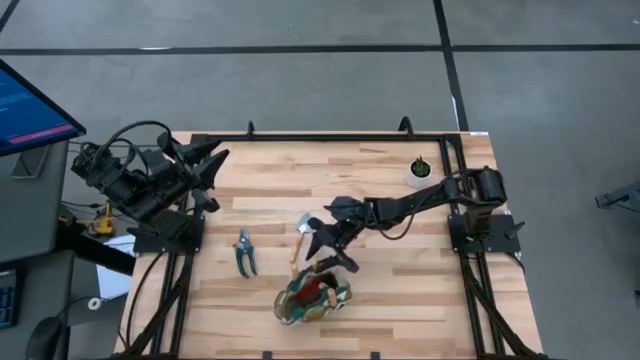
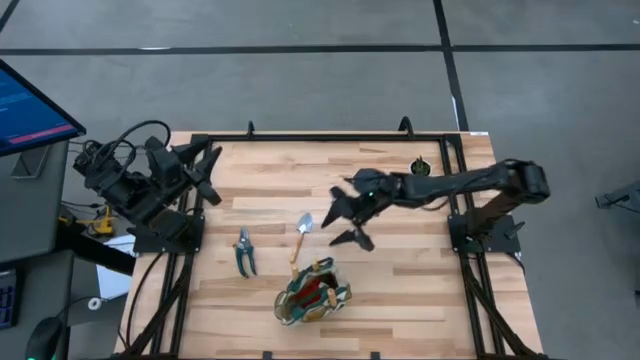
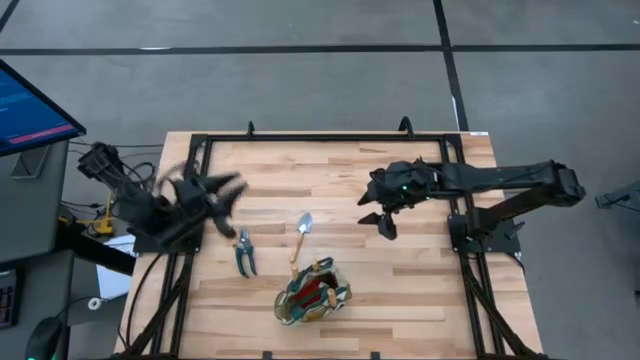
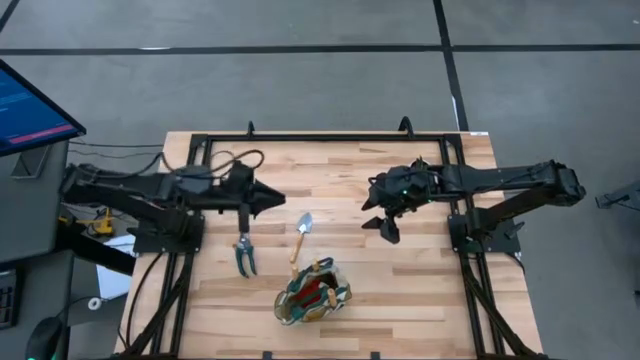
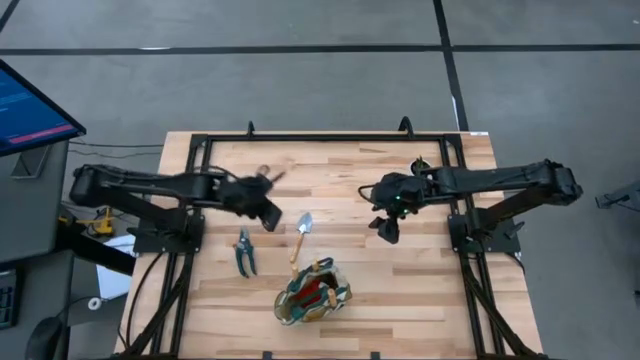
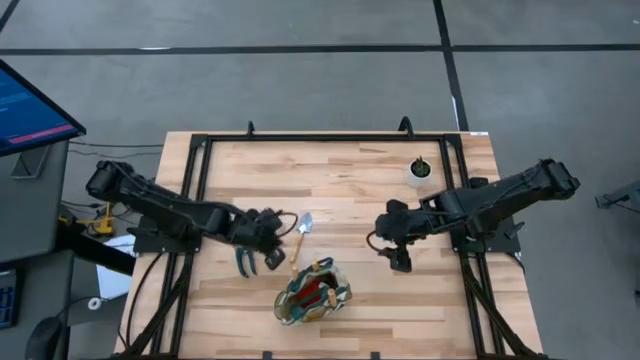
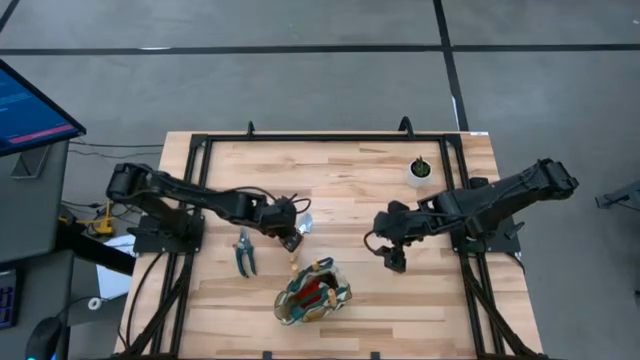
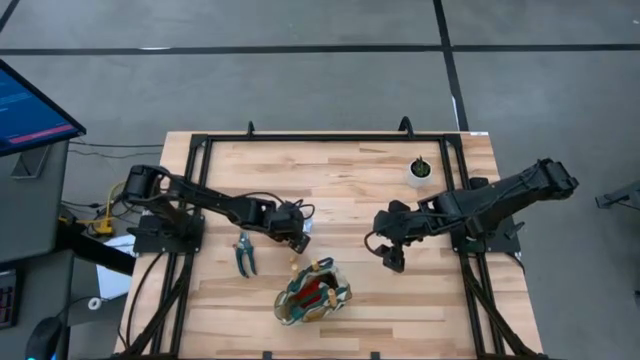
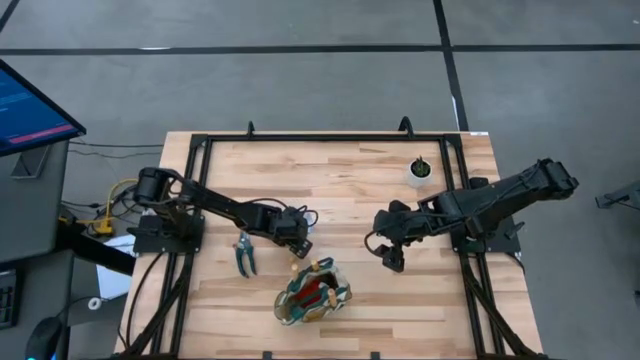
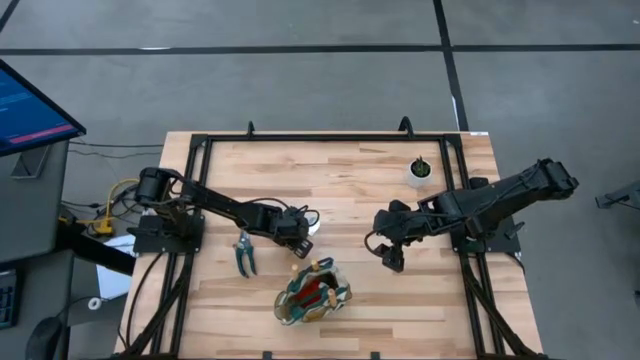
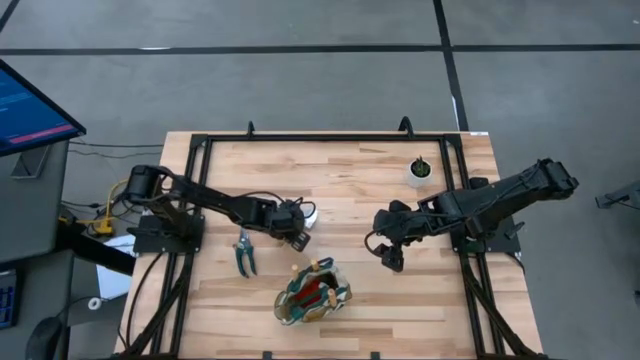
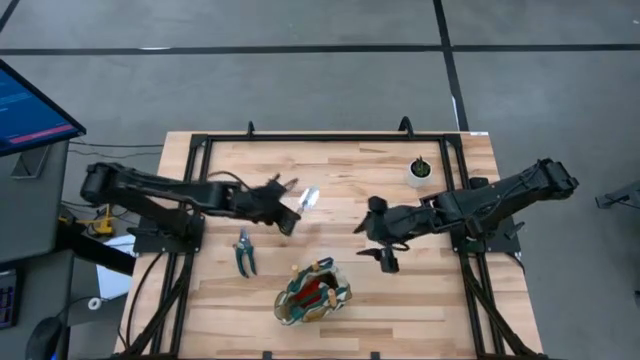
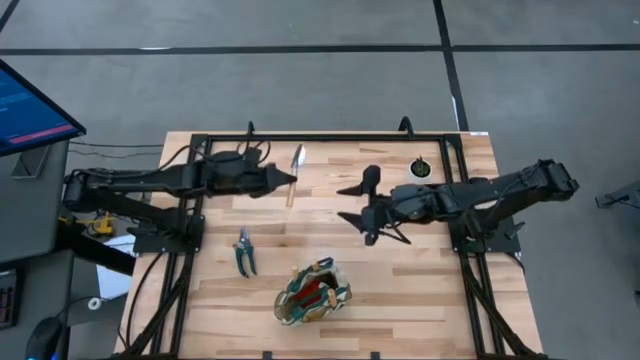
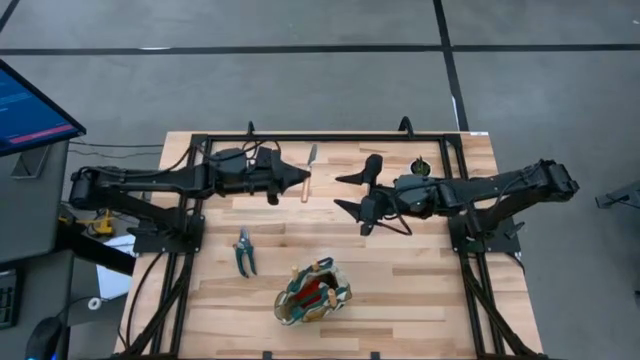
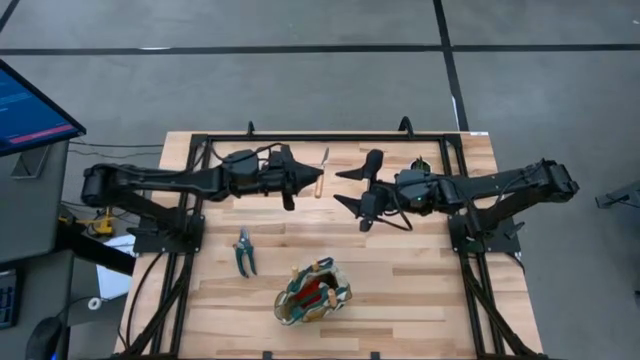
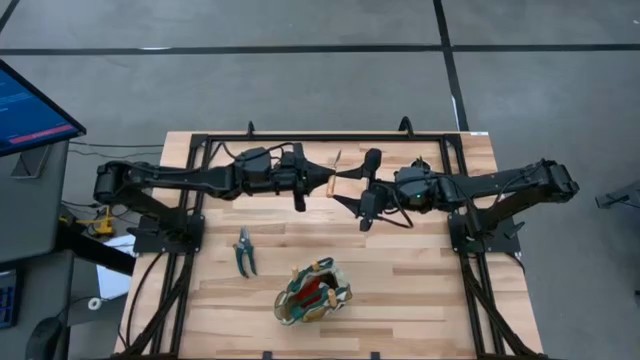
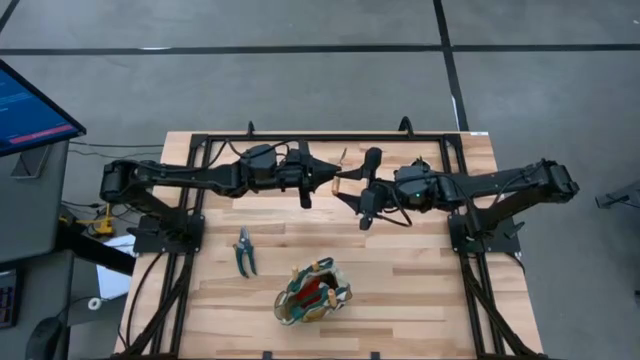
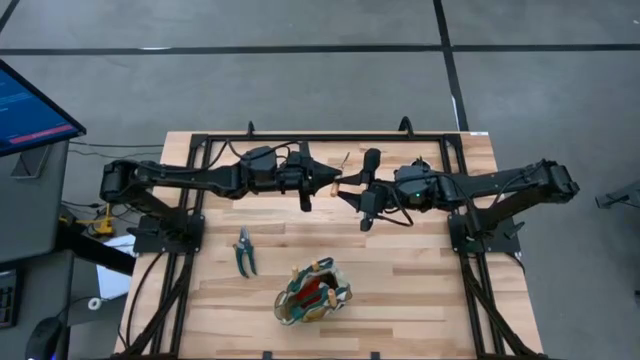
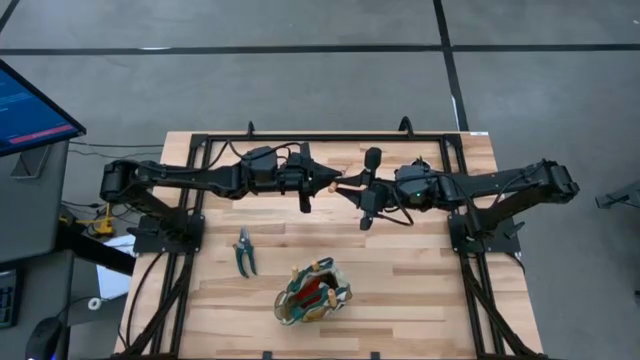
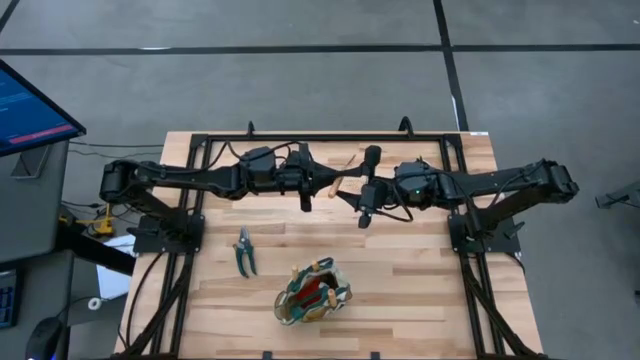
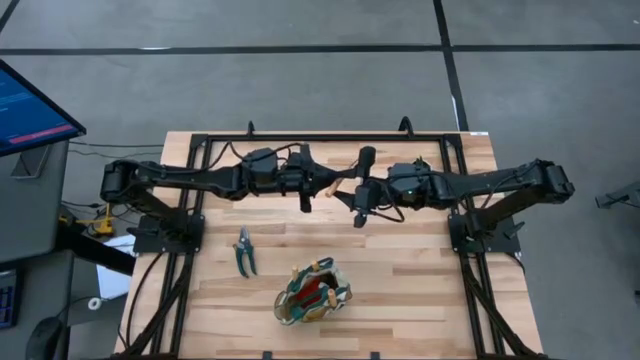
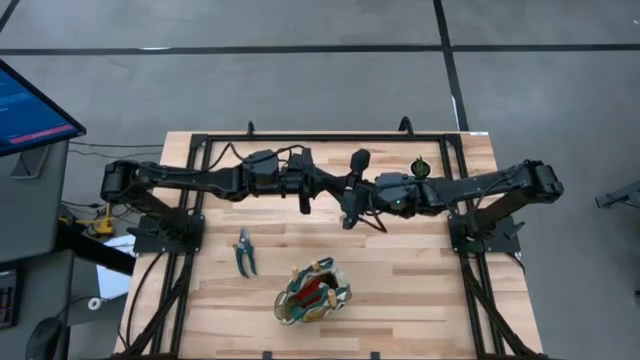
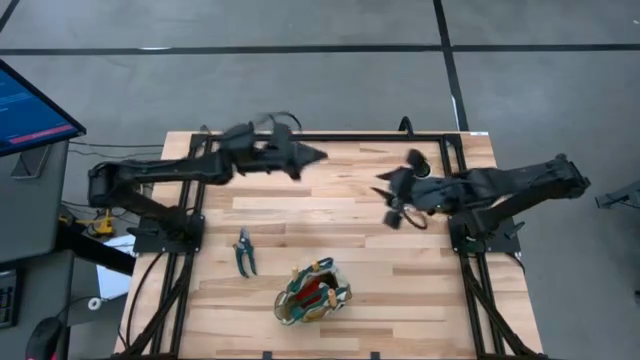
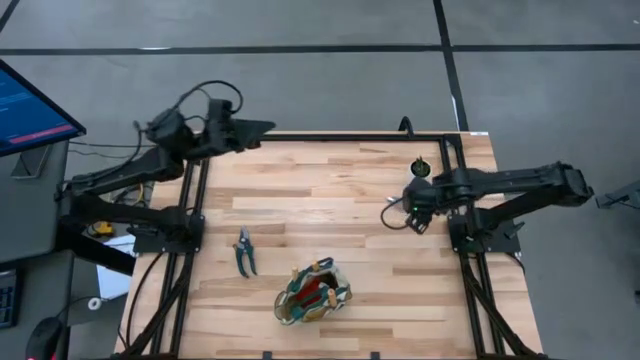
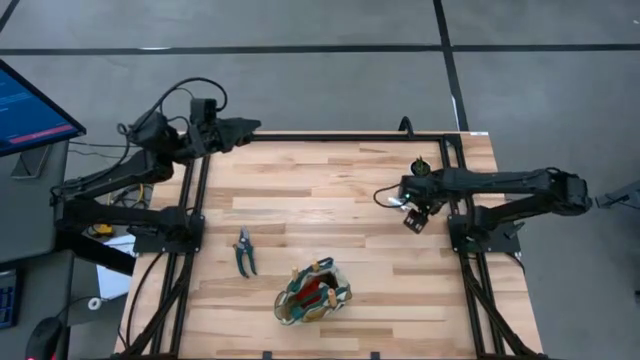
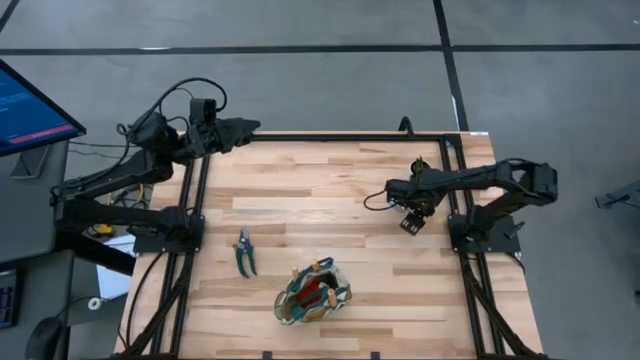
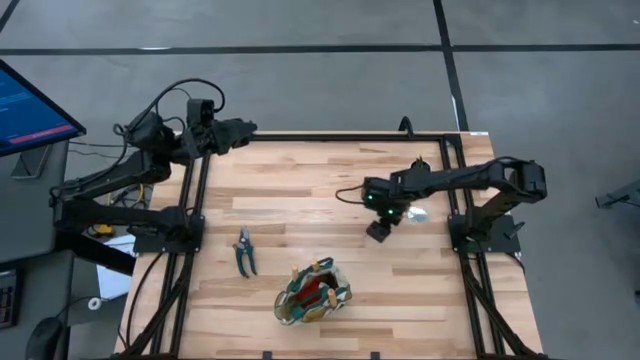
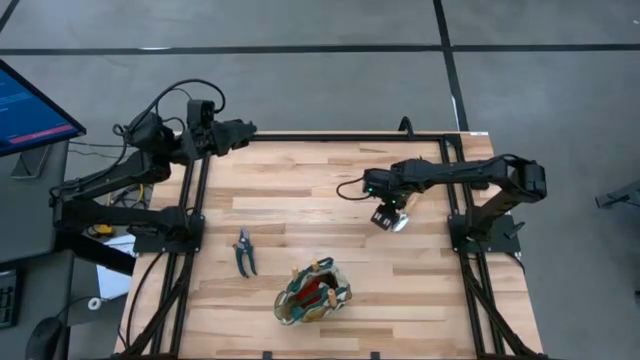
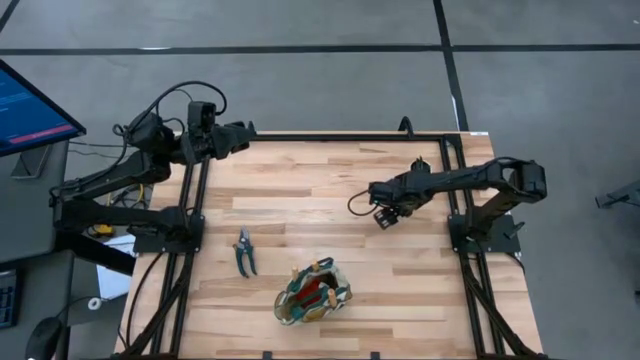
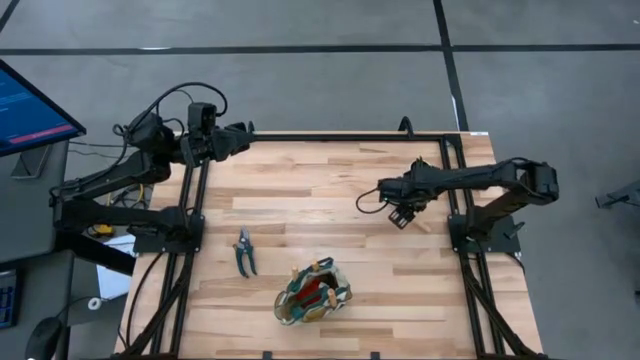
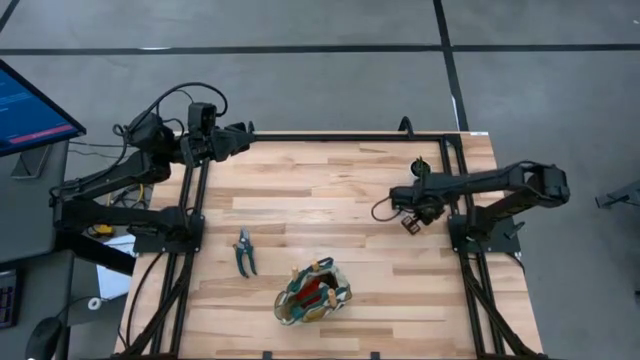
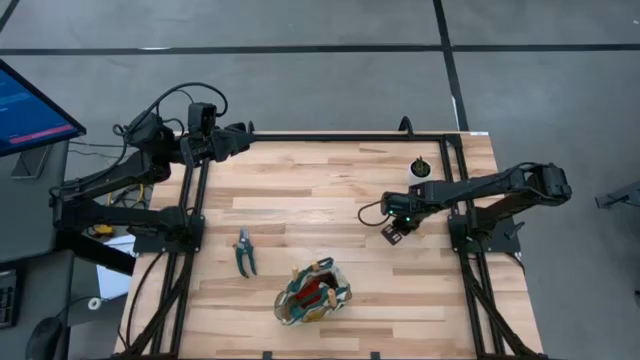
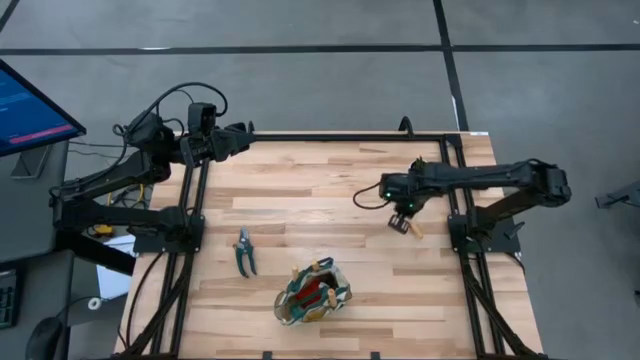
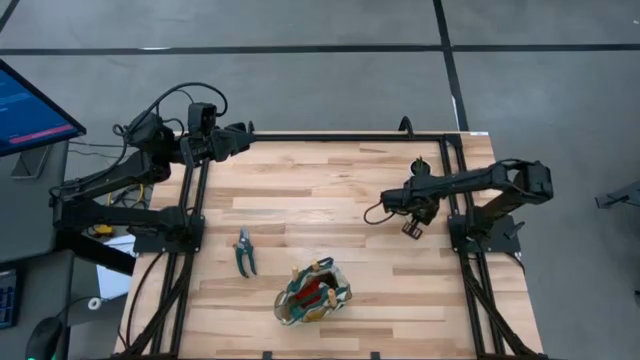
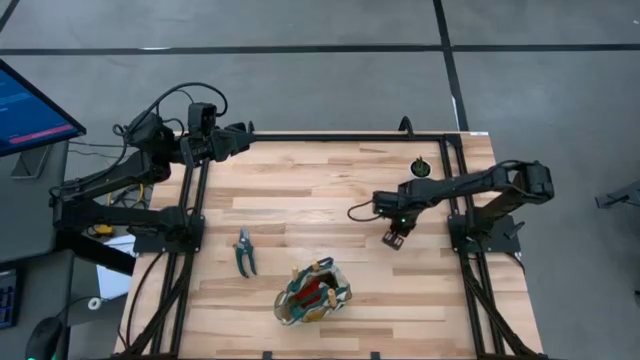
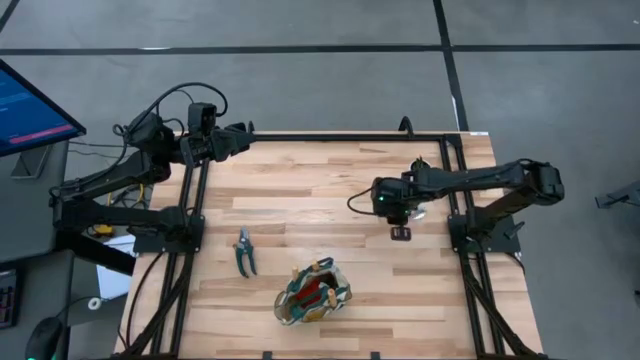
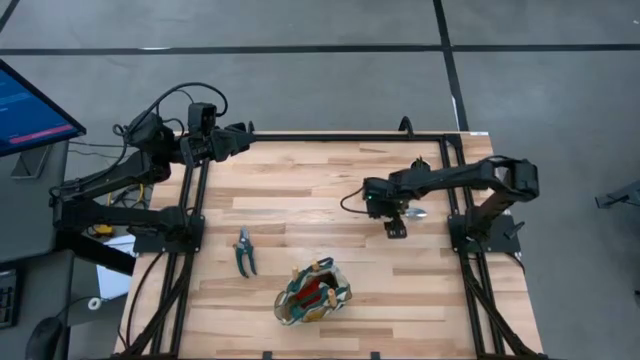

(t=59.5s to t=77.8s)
Task: Pick & Place Garden tools in Gardening bag
Put the brown trowel into the gardening bag pocket

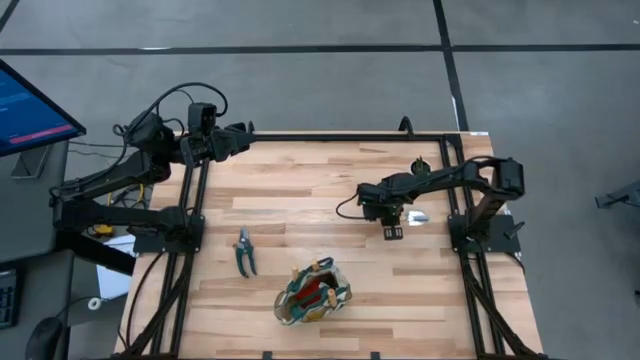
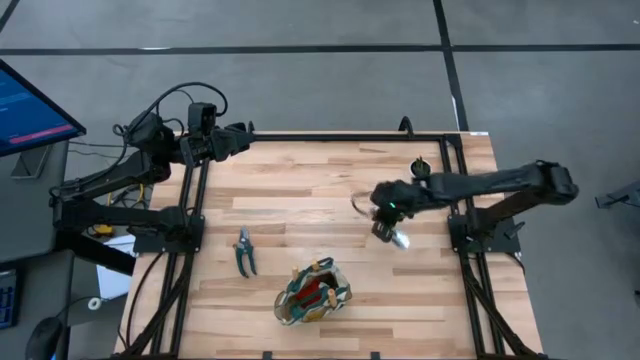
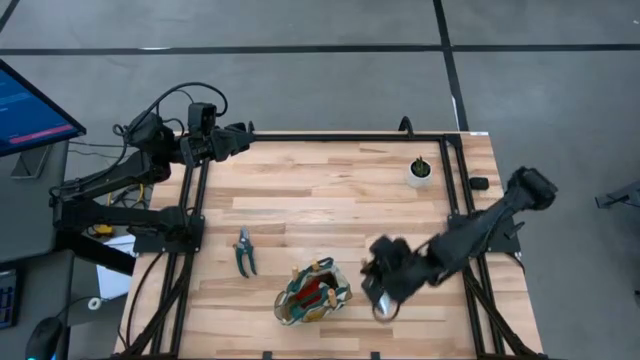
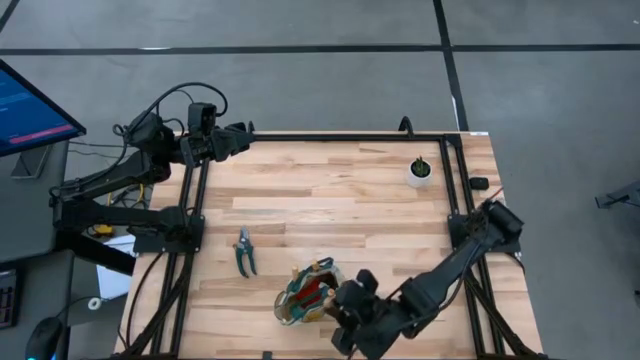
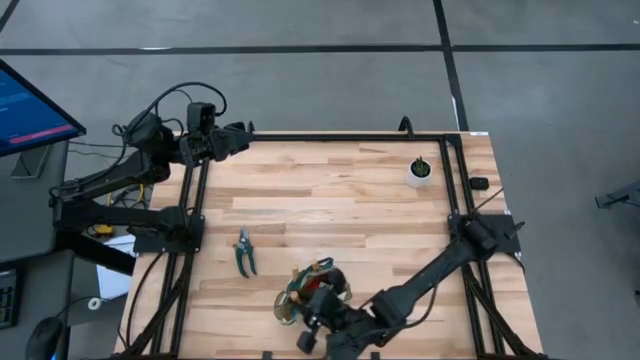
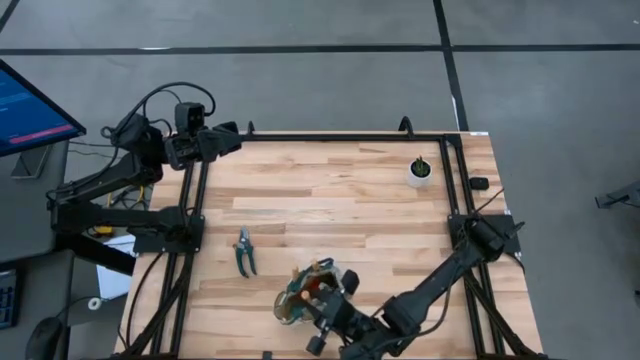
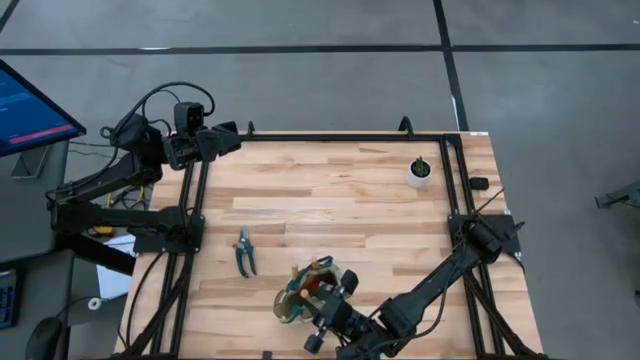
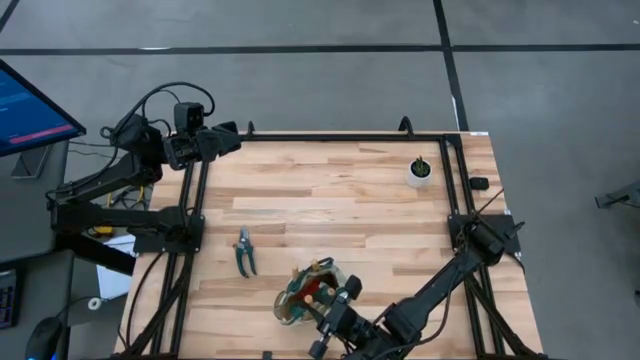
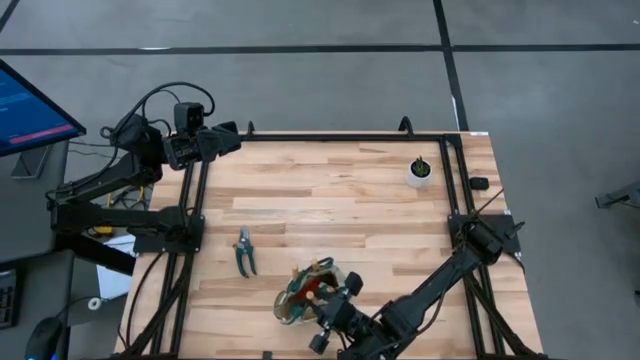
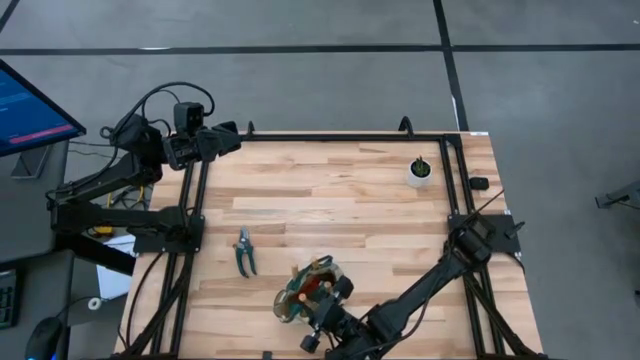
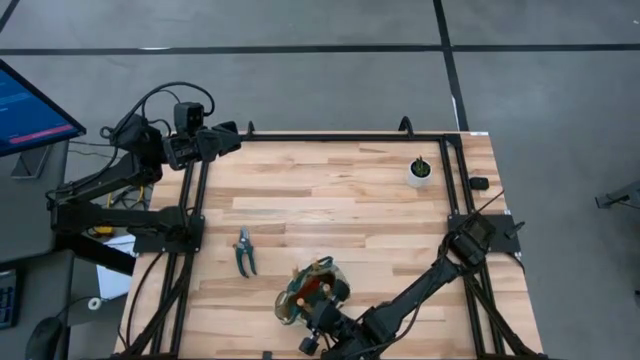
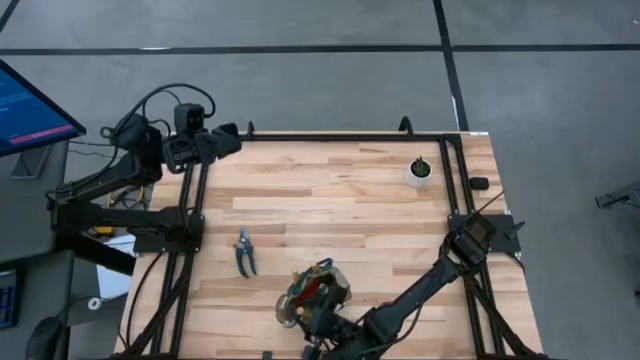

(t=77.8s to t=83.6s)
Put the brown trowel into the gardening bag pocket
